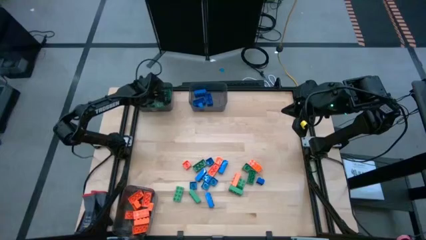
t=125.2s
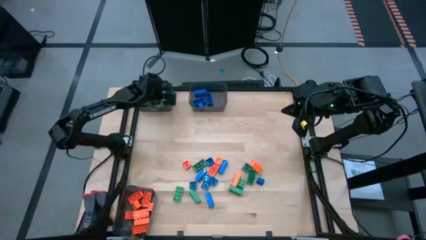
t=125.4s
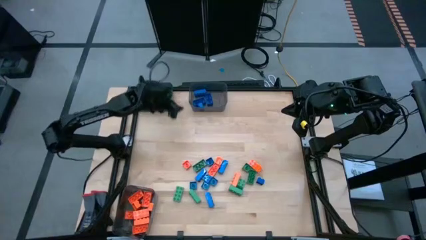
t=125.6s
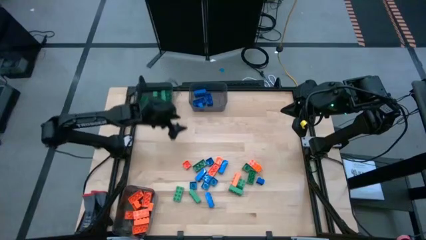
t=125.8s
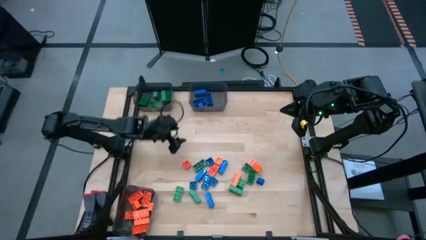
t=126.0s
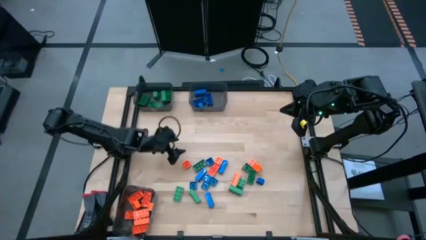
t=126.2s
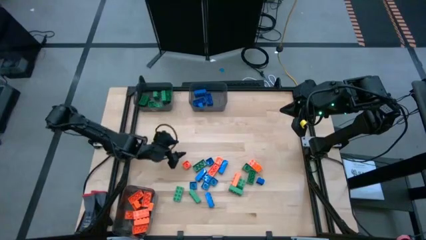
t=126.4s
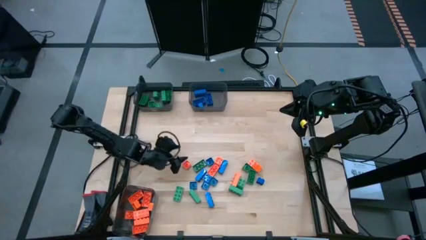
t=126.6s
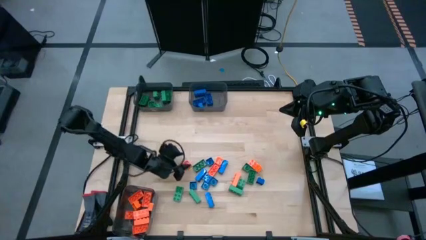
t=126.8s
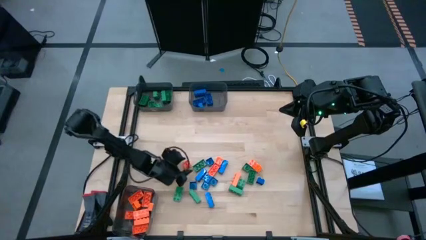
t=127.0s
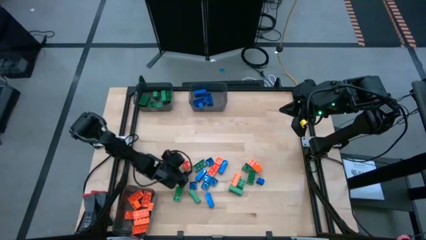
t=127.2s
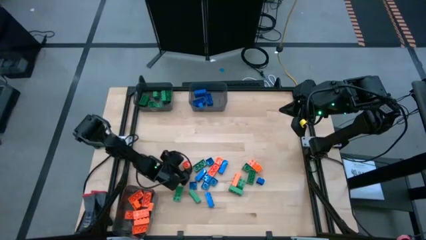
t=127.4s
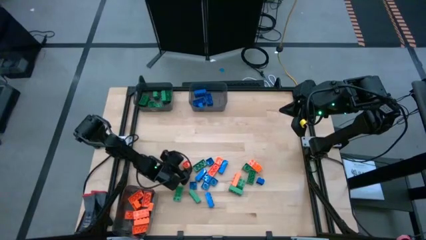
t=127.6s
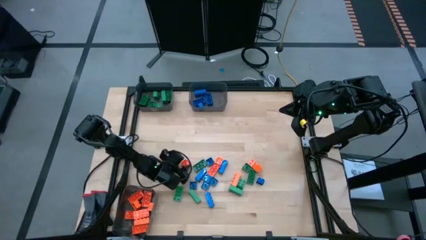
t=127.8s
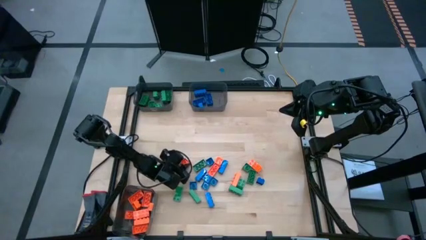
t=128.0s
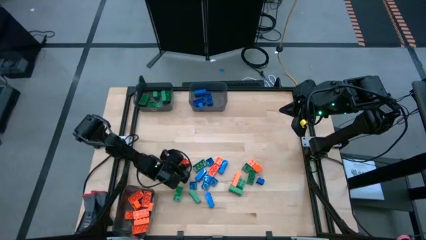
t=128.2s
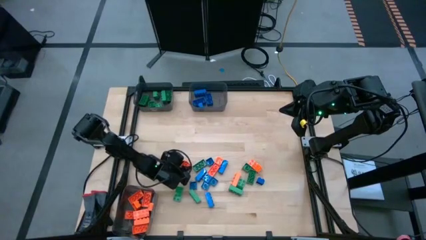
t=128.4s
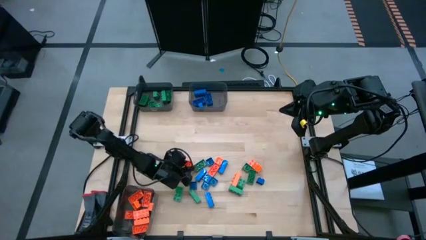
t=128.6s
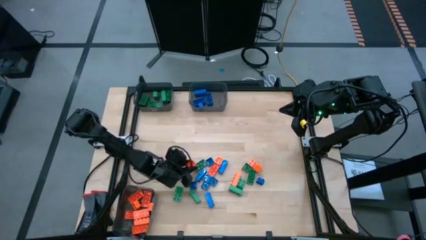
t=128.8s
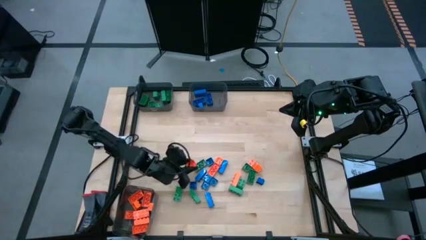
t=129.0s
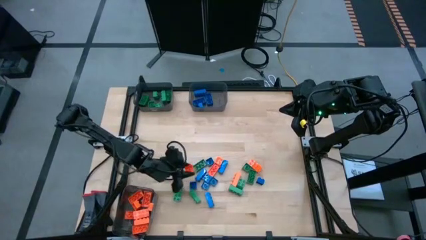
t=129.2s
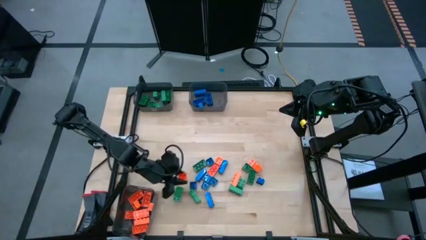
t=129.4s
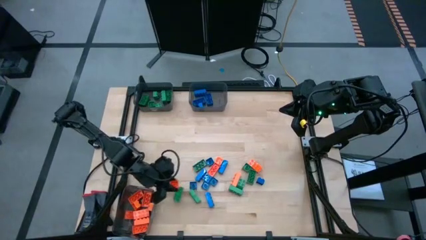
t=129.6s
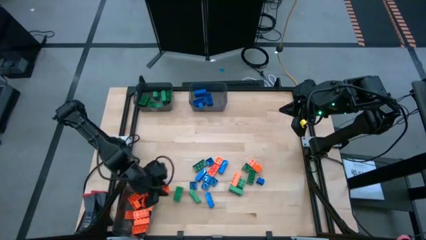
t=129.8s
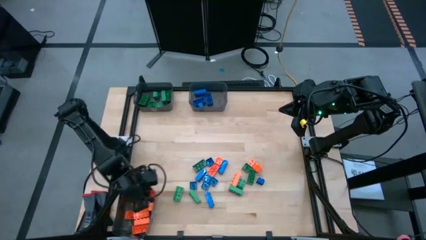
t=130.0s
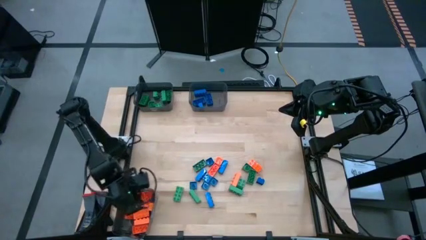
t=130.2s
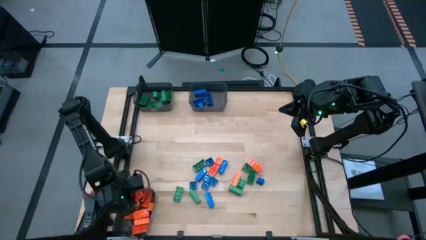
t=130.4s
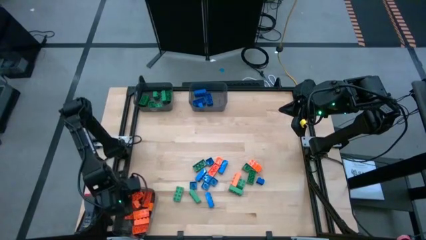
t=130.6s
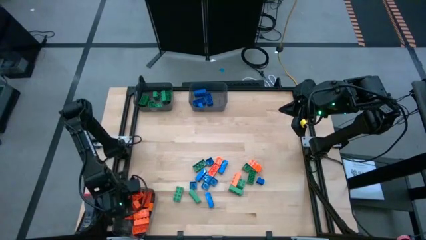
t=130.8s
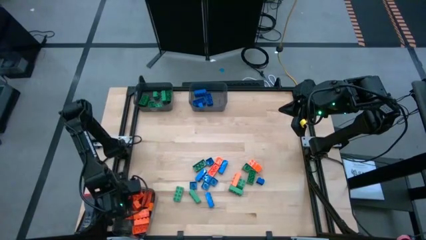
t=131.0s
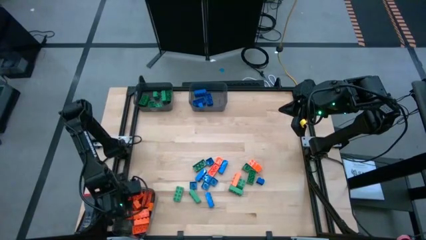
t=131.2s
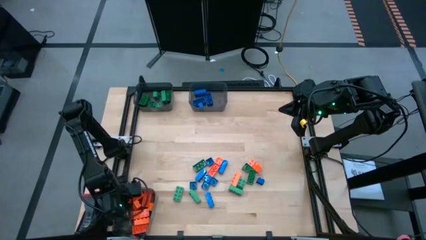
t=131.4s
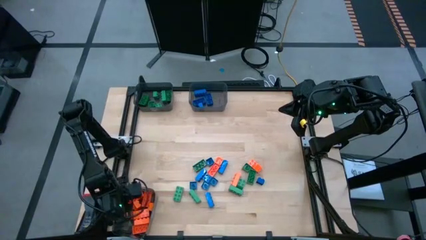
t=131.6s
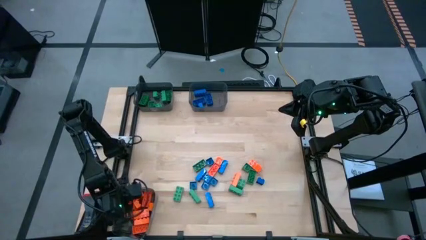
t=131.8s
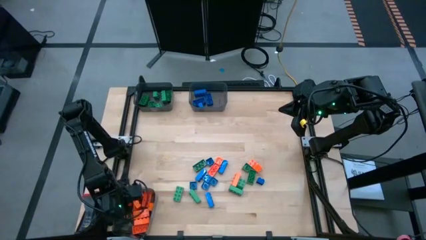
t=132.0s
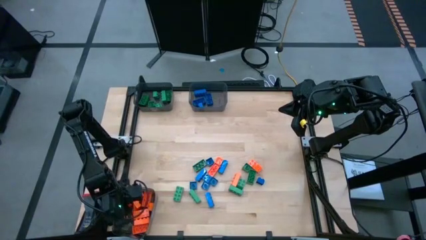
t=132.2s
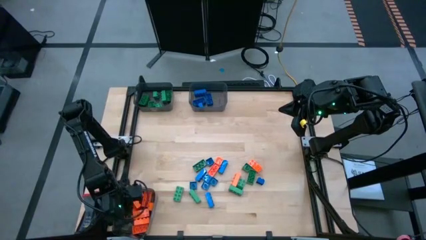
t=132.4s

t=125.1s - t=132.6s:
Task: Sort blocks
Put the orange gamepiece into the bottom black bin

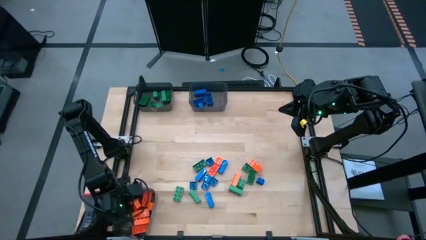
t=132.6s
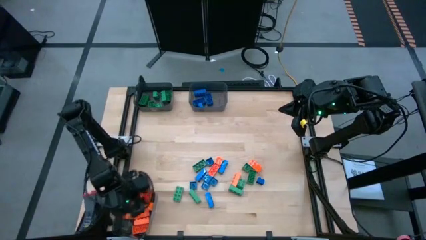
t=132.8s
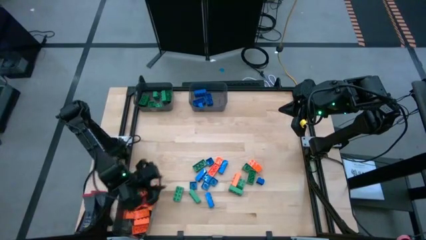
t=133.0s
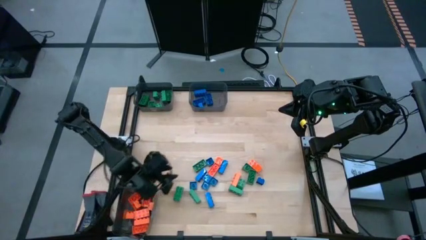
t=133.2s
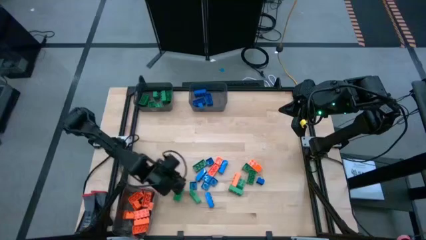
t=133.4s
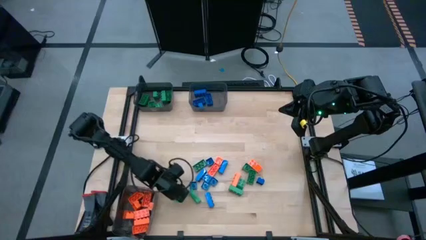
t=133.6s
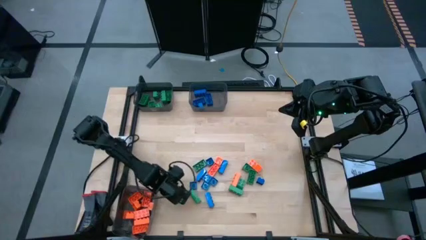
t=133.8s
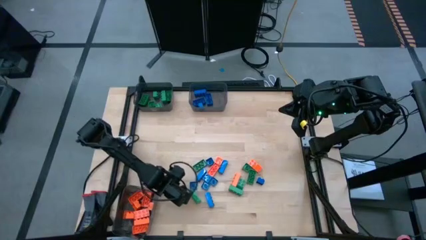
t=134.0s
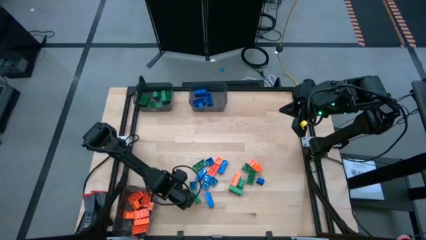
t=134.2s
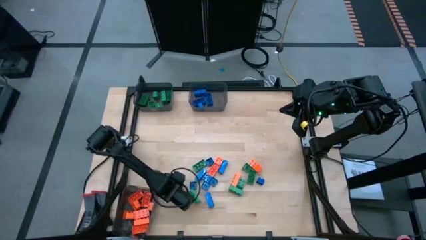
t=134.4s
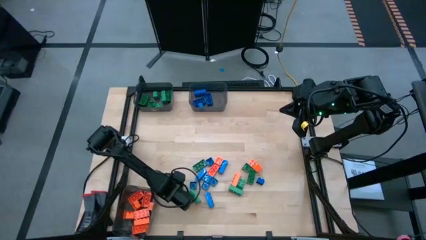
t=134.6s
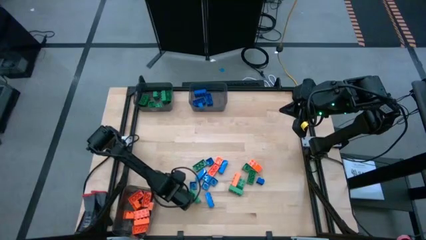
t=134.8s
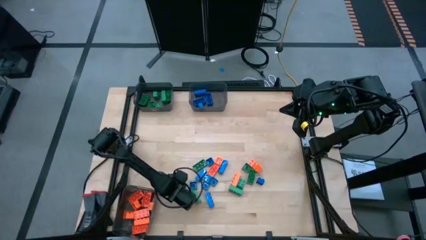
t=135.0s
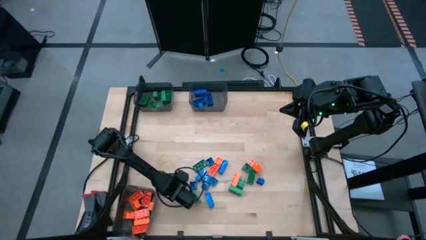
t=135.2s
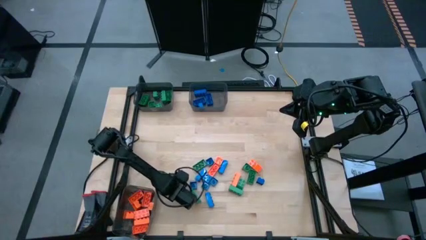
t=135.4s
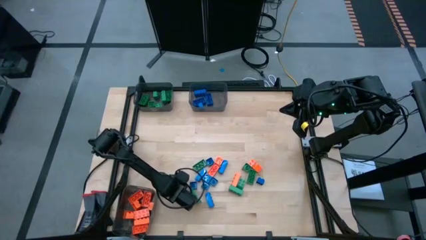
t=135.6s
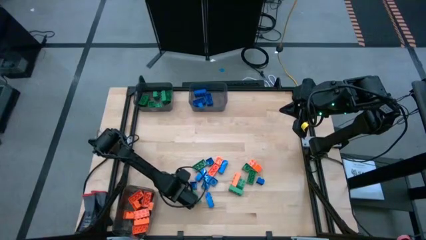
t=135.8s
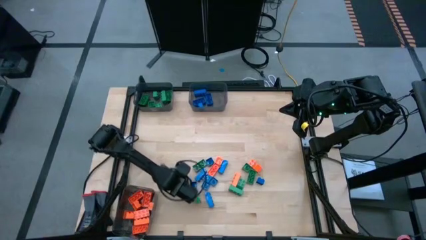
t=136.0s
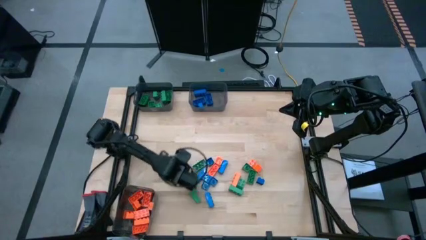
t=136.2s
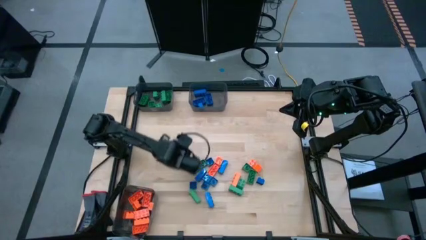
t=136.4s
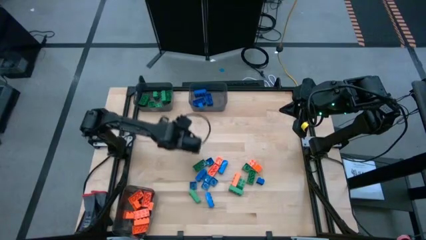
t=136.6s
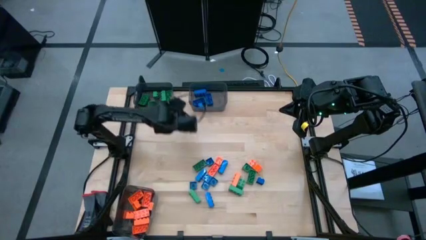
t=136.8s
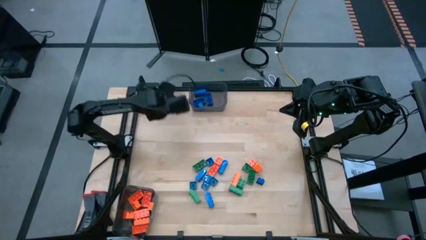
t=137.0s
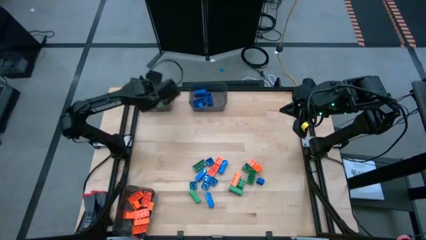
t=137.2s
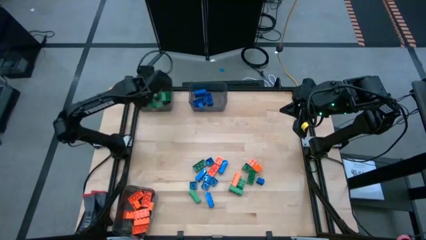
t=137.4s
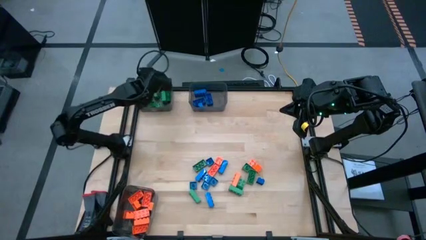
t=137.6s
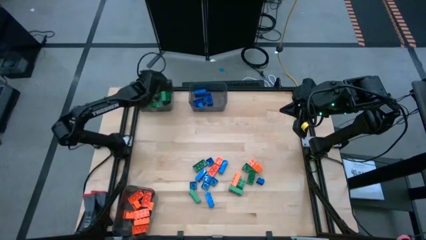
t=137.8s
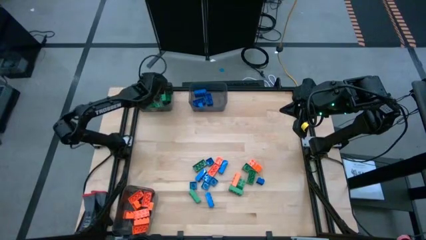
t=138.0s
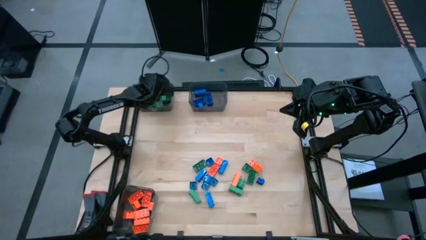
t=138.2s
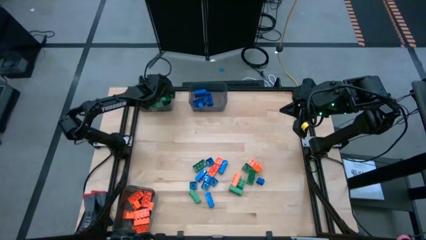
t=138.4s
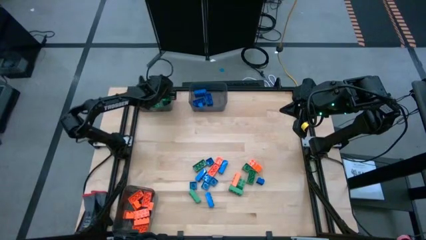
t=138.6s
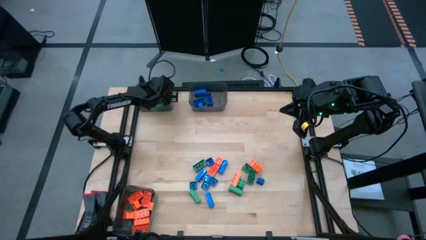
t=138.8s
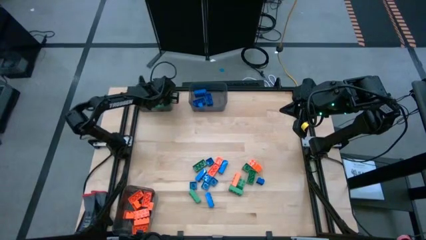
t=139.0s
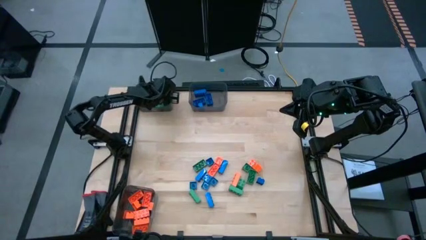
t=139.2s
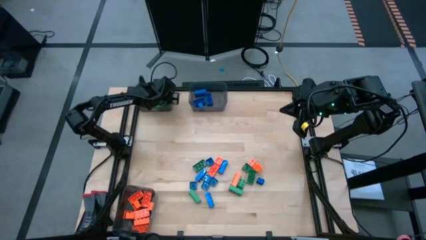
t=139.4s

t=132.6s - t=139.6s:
Put the green gamepiece into the top left black bin

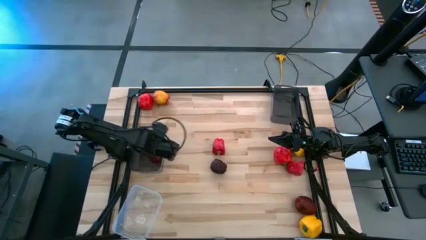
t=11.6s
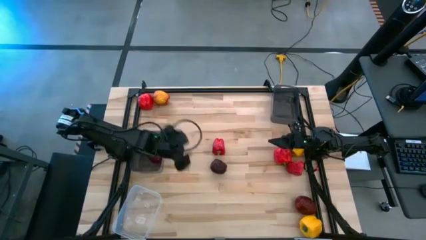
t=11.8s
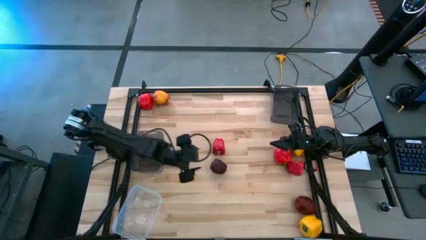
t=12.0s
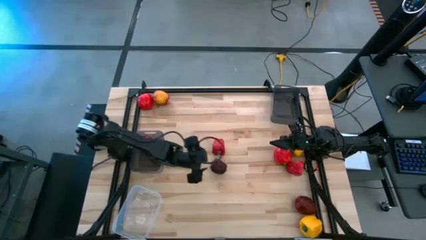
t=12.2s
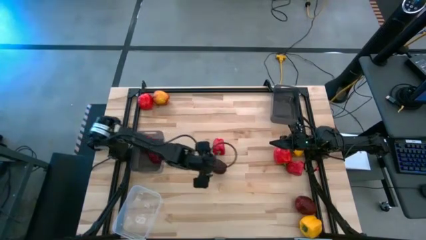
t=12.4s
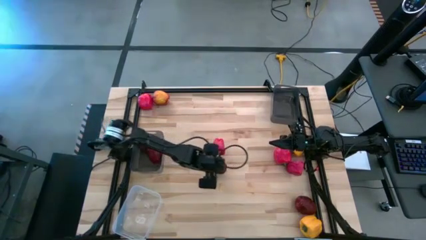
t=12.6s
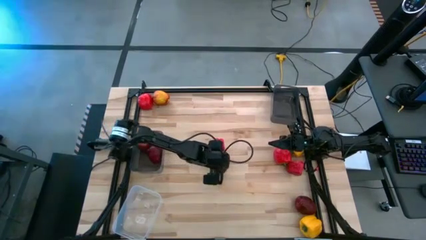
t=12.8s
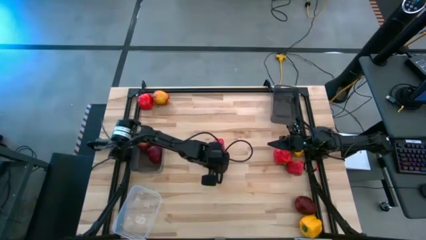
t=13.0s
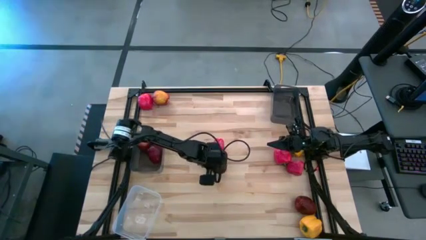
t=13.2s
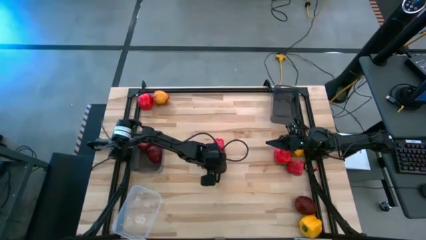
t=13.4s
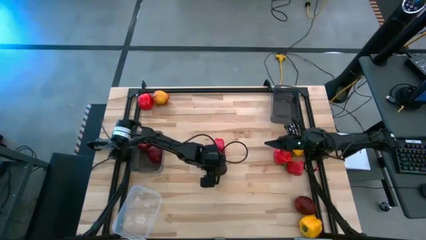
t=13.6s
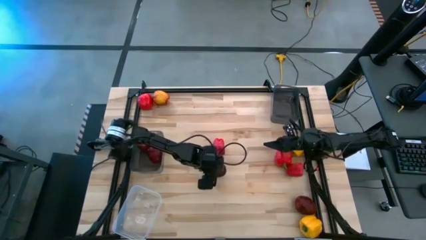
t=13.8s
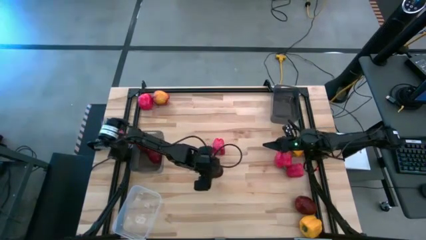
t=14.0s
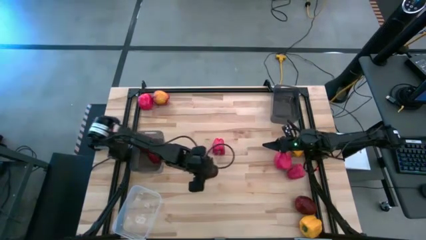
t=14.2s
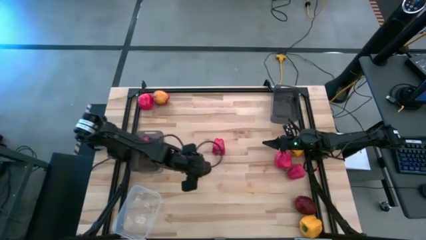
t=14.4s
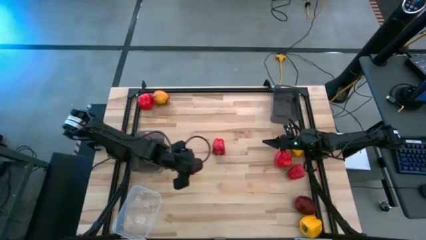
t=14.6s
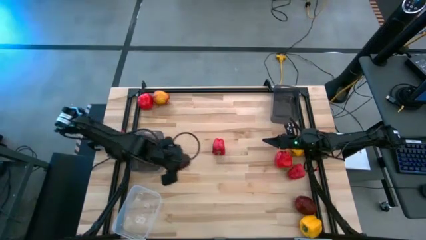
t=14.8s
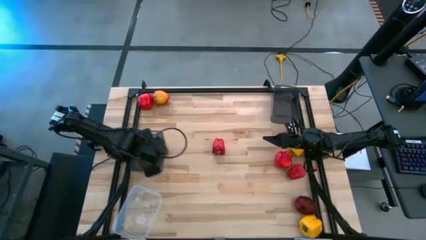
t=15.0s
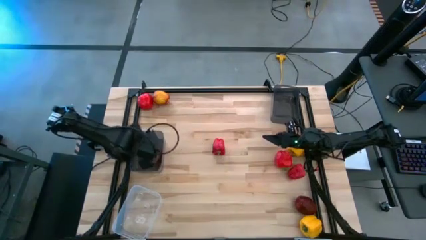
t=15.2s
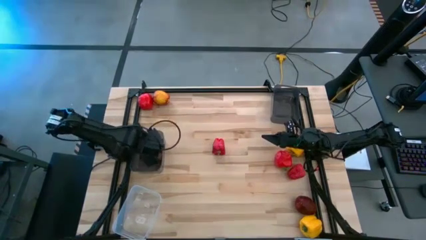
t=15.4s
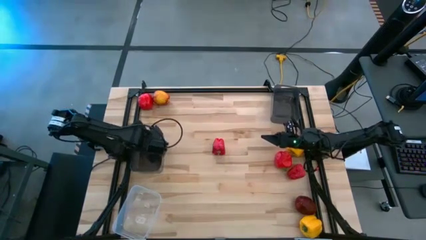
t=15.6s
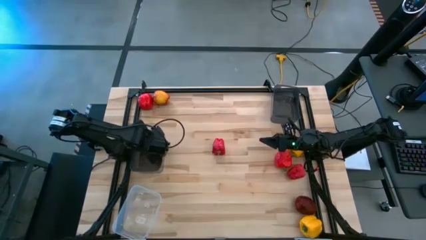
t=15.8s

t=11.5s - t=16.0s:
Task: Sort produce into baskets
Put the red apple into the left black transparent bin
